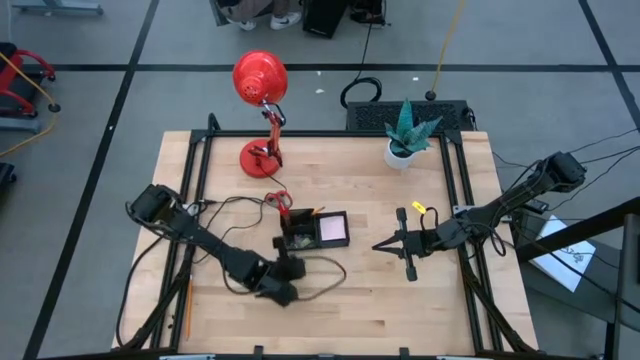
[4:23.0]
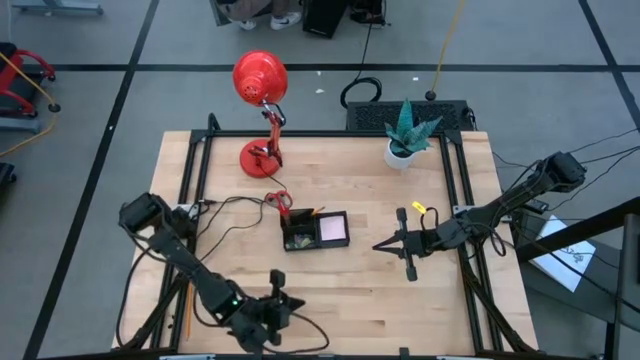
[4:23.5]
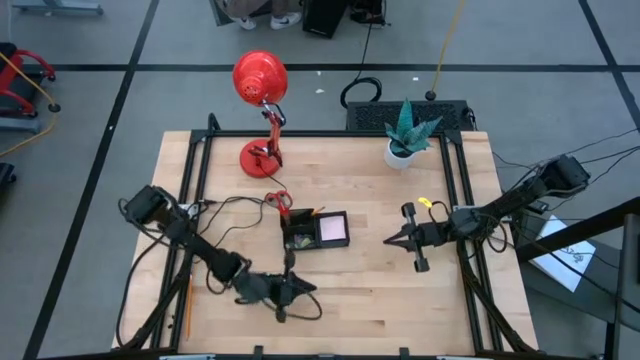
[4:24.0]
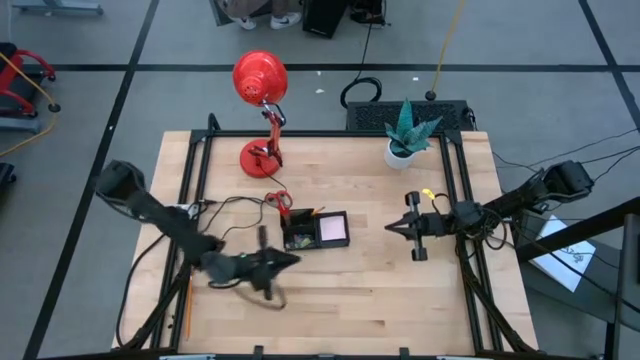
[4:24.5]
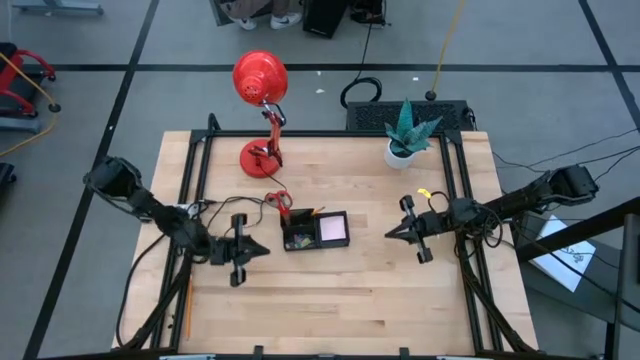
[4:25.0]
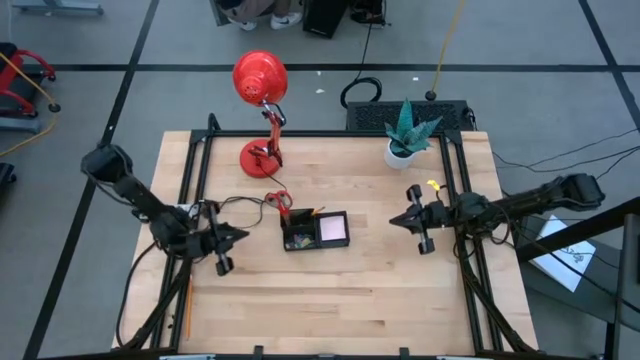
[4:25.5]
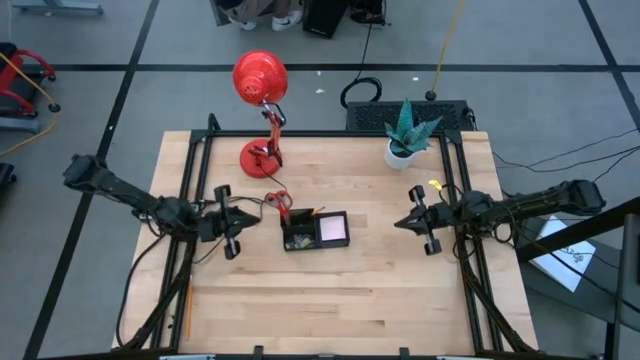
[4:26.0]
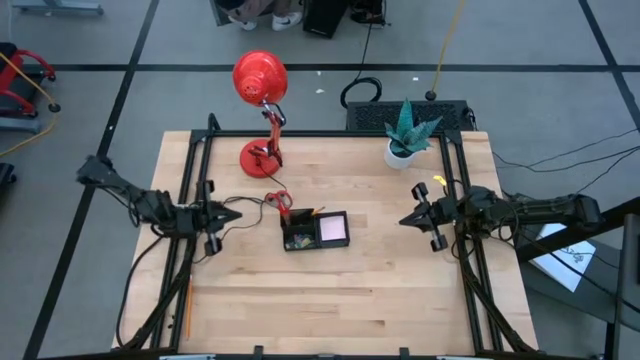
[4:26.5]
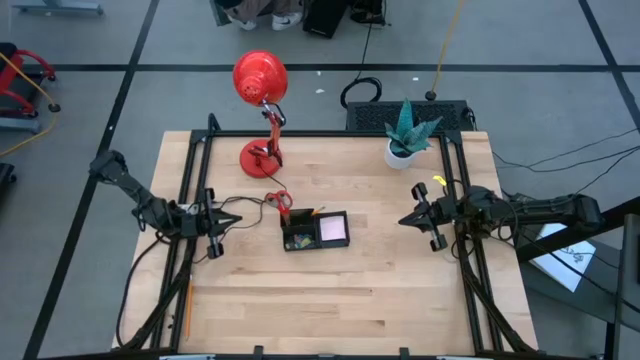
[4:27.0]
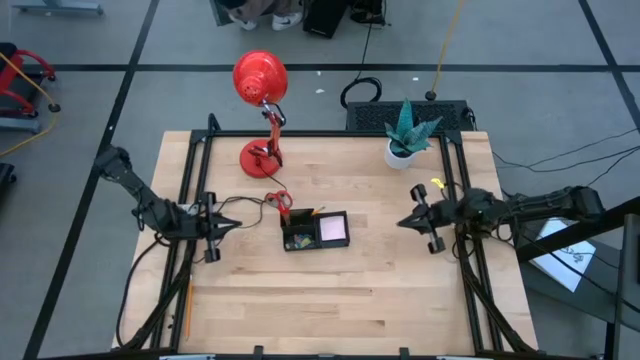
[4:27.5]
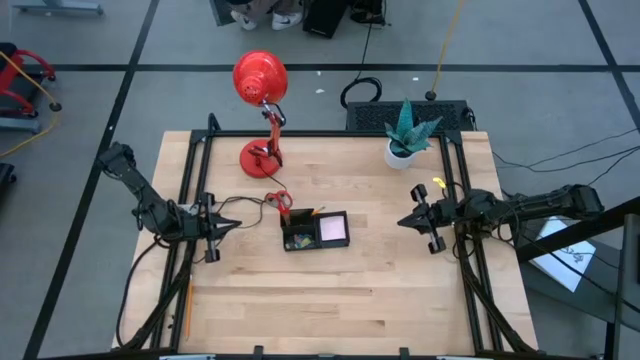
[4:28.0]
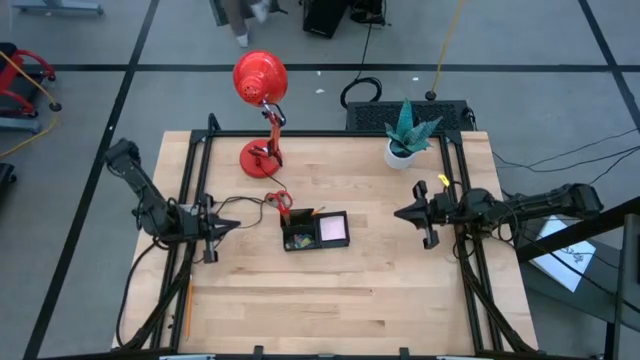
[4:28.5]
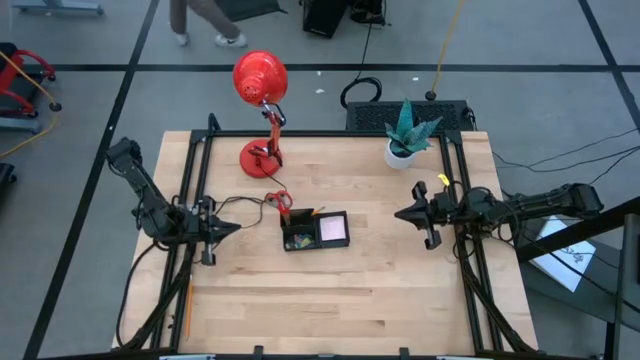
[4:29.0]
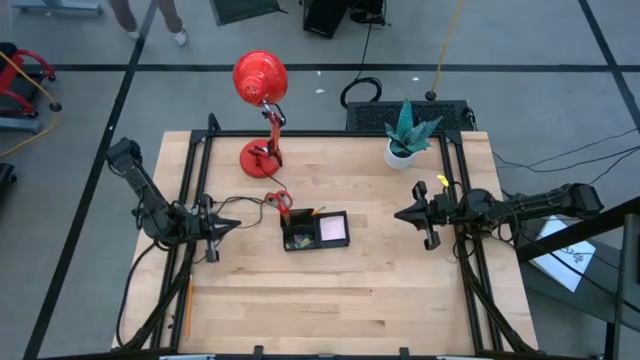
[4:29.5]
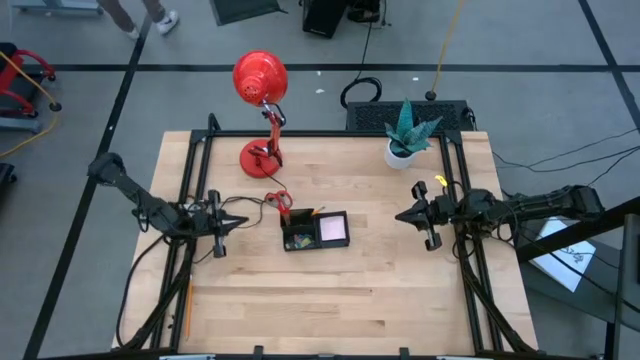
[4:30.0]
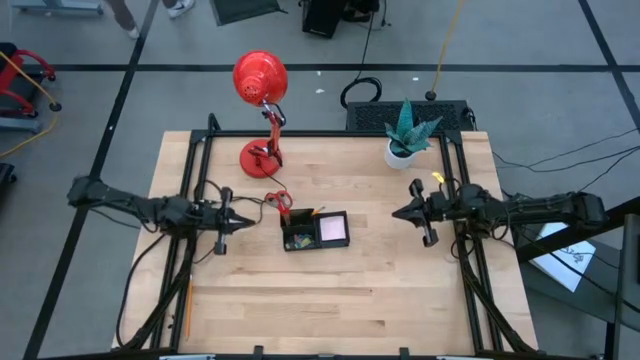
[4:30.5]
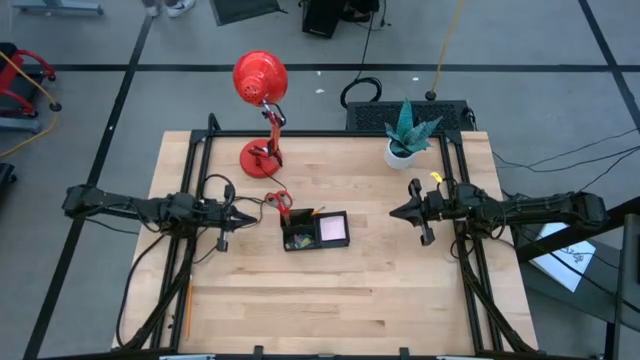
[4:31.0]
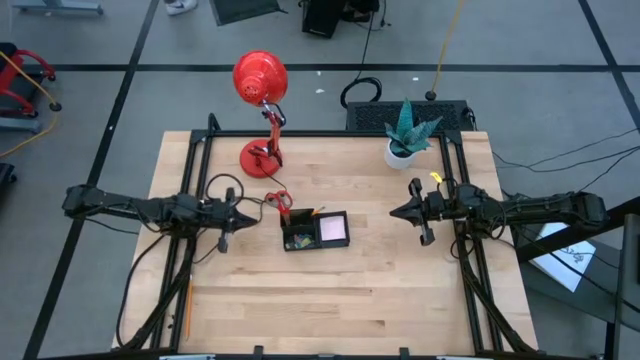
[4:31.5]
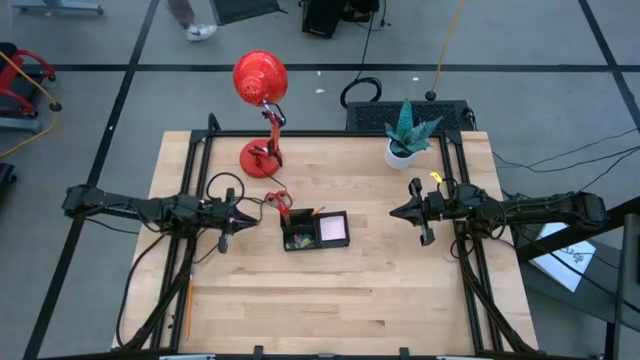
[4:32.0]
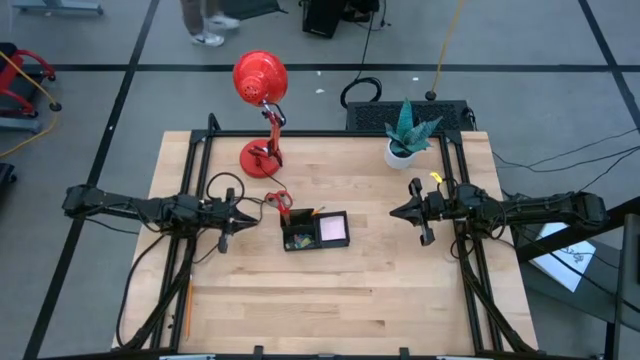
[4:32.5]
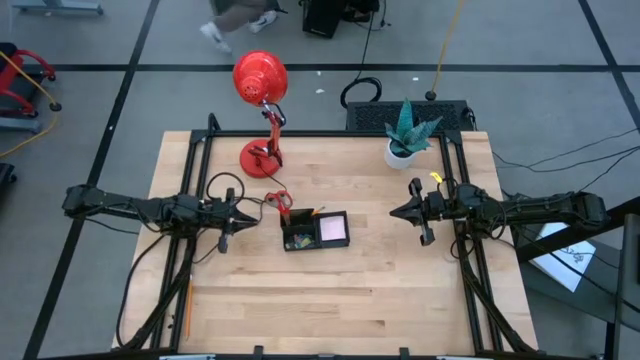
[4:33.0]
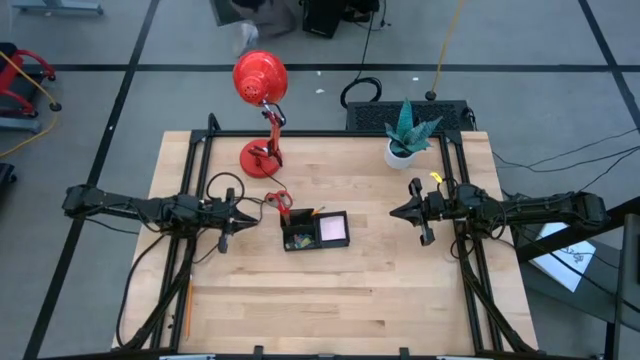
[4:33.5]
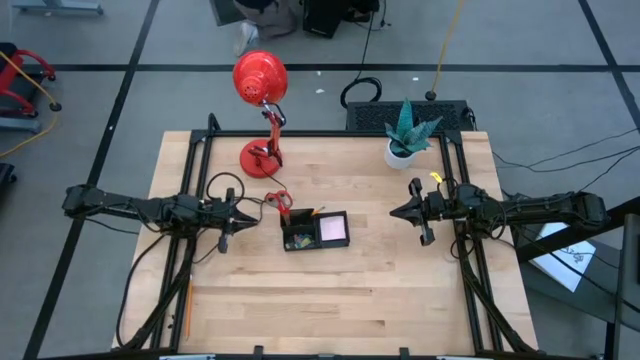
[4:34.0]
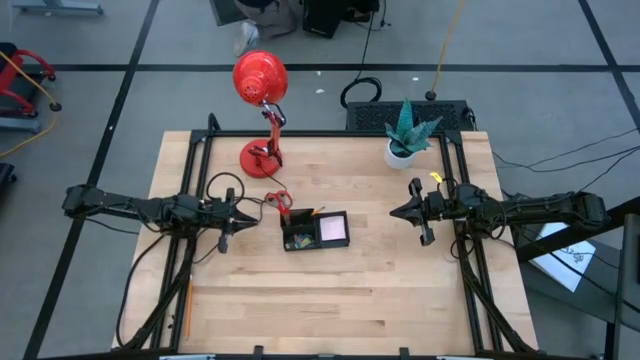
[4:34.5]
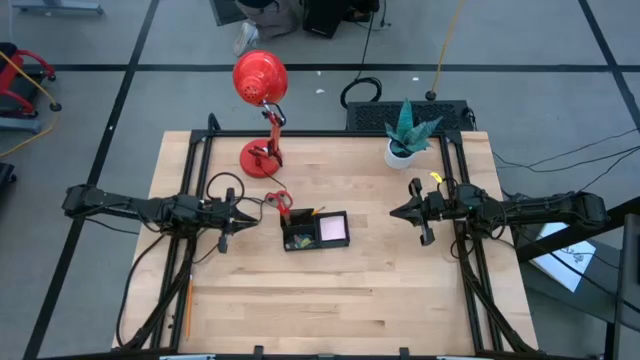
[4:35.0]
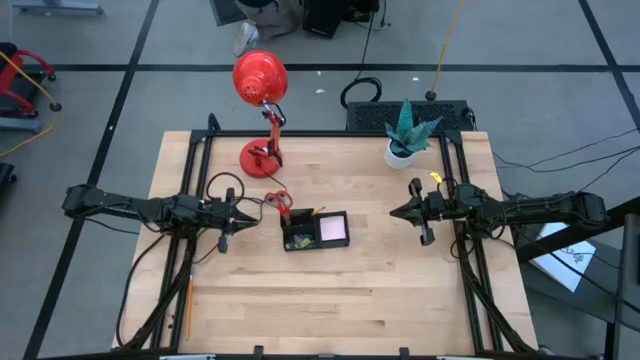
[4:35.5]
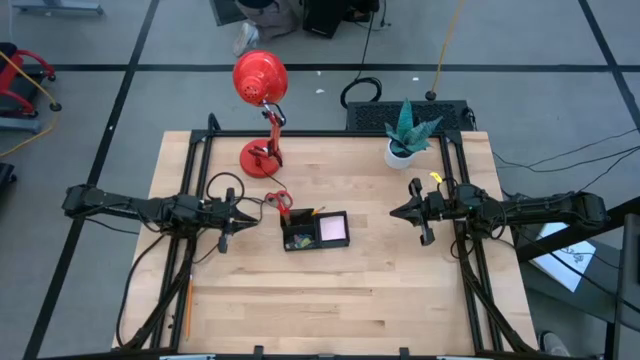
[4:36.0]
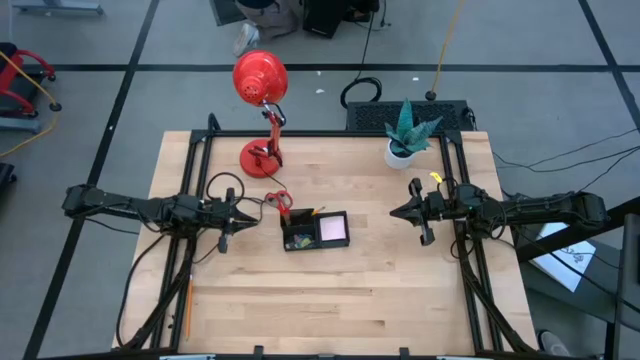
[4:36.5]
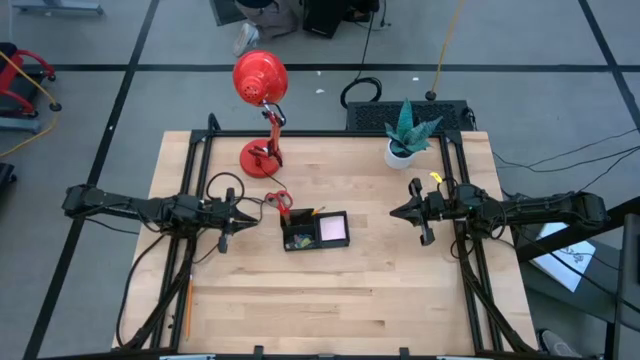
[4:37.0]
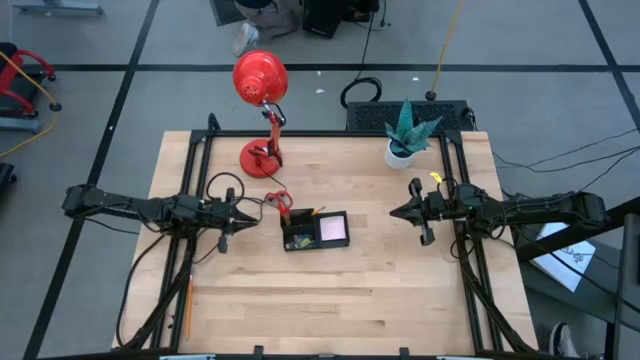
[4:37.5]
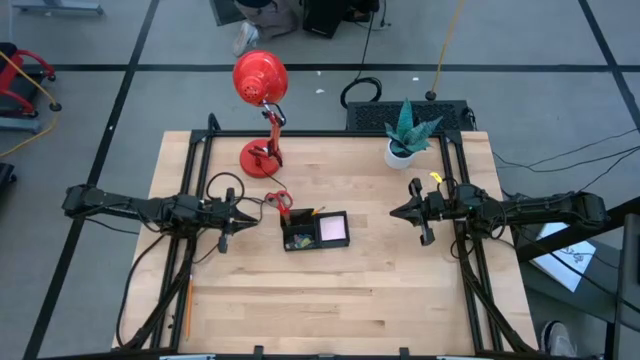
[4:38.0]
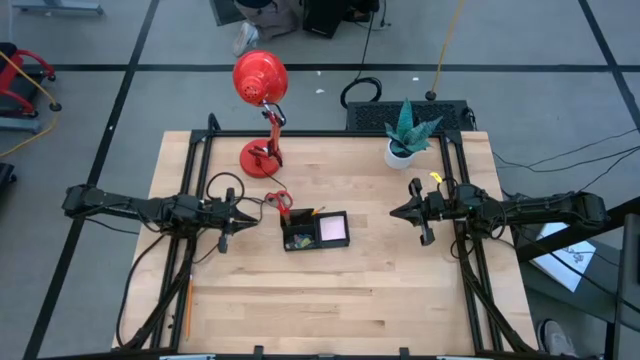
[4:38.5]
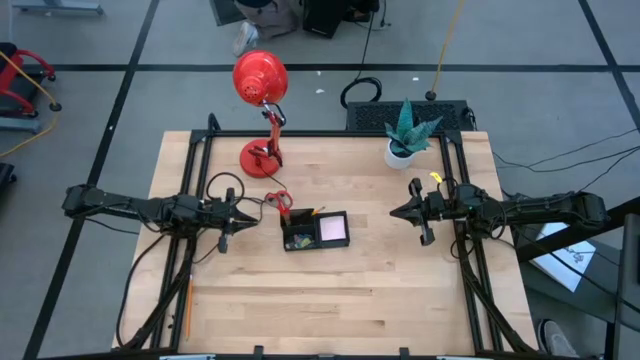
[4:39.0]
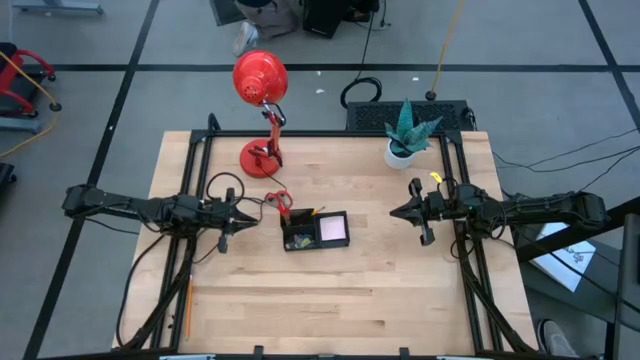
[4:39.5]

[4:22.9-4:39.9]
Task: Pick and place office supplies into organizer
Return to Home Position

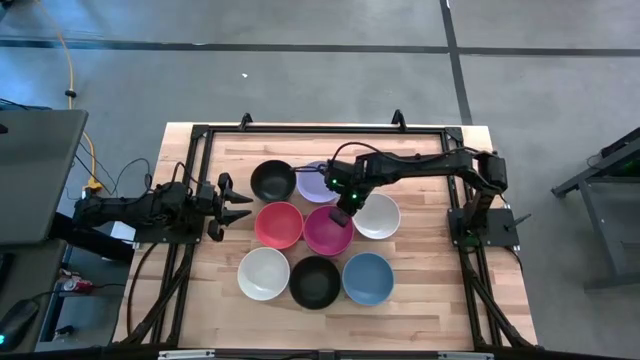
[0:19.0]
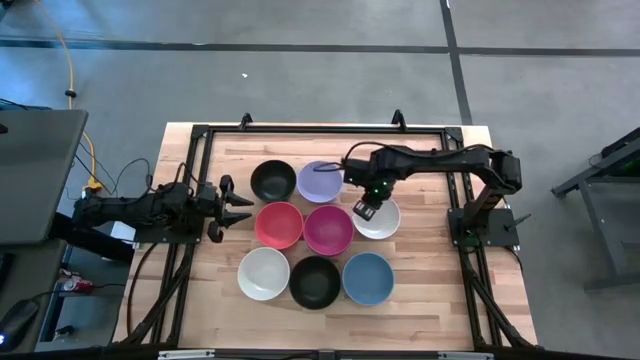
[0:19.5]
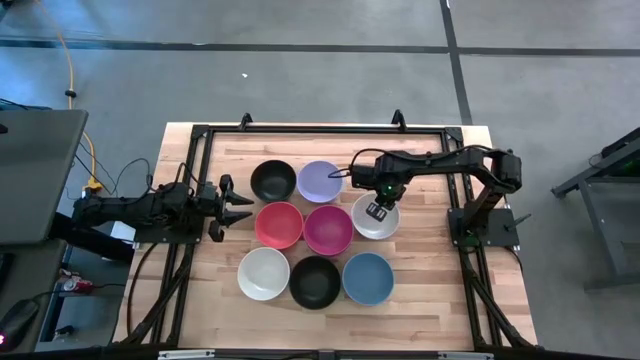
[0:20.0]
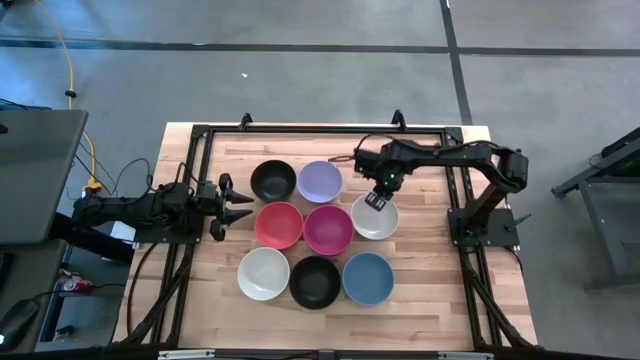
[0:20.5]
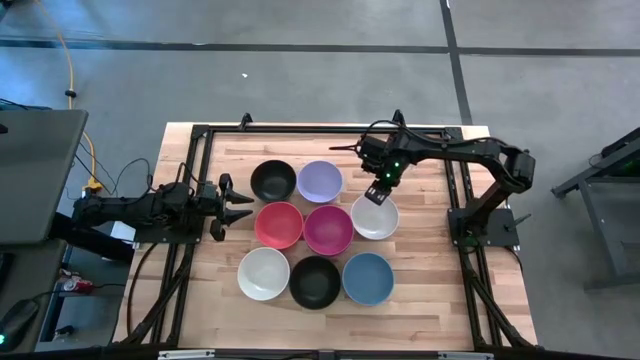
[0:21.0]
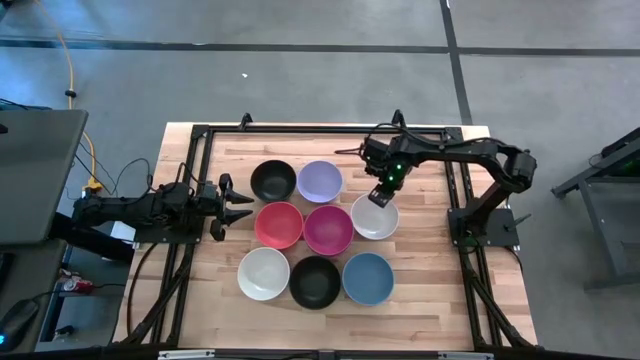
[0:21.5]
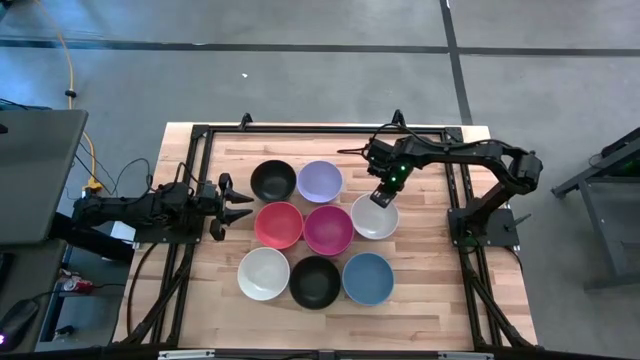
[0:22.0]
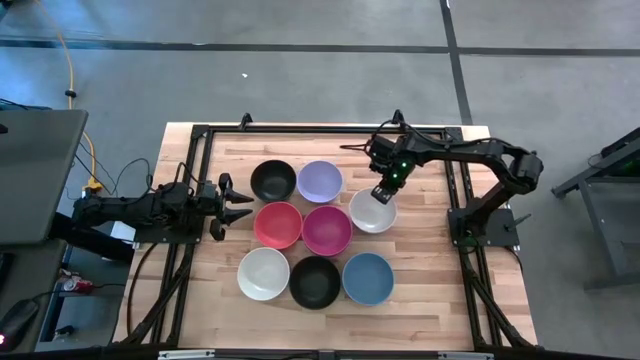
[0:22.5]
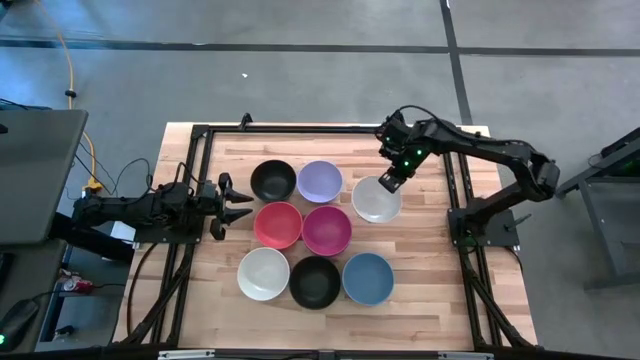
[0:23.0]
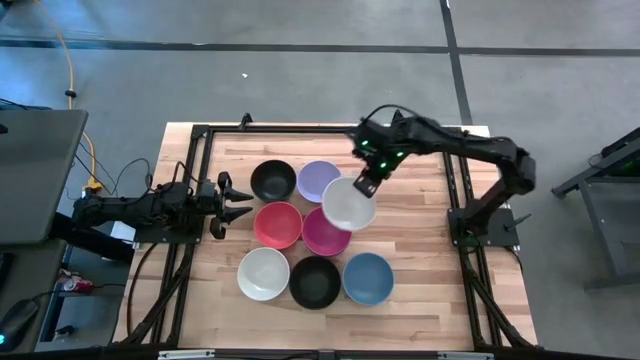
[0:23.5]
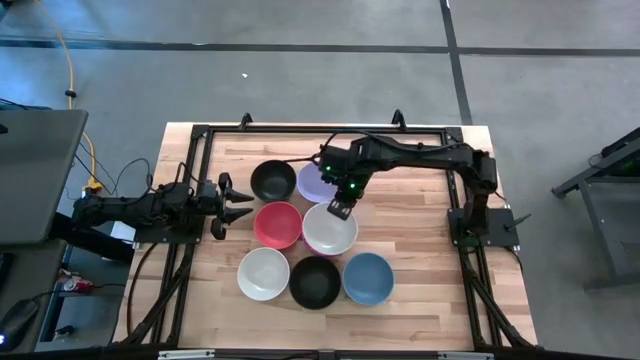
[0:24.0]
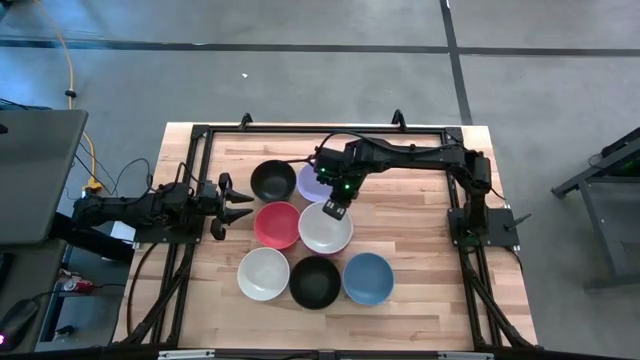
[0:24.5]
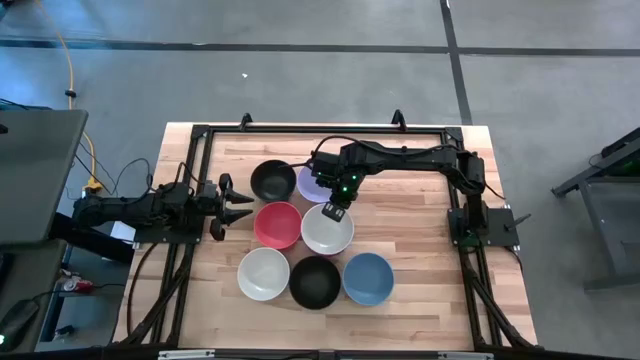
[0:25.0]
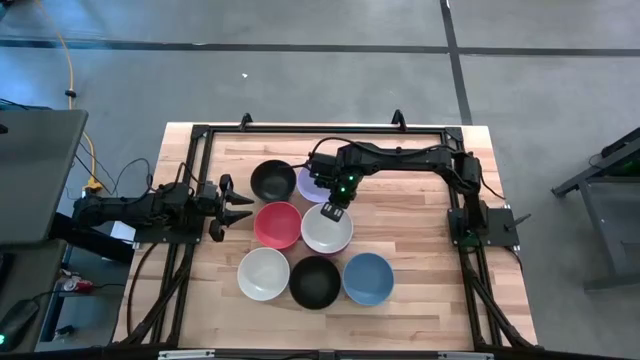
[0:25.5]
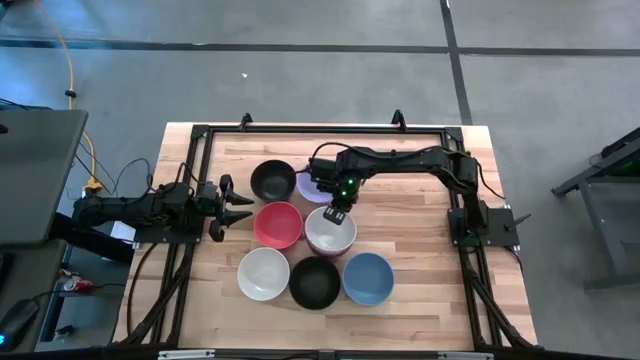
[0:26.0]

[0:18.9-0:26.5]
Task: Nest bowls inside each other
Stack the right white bowl on top of the pink bowl
